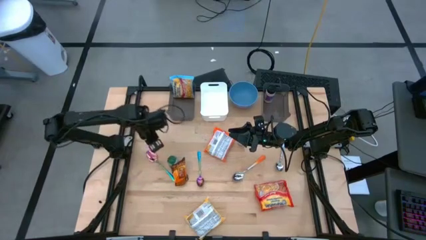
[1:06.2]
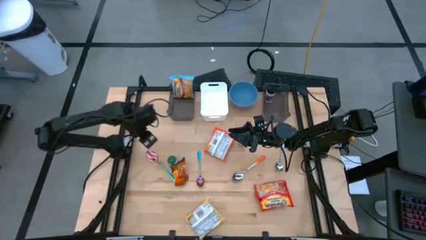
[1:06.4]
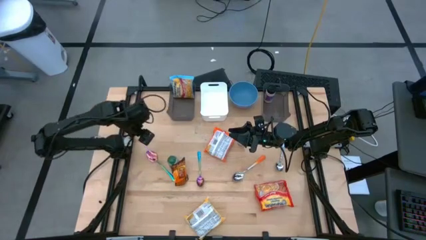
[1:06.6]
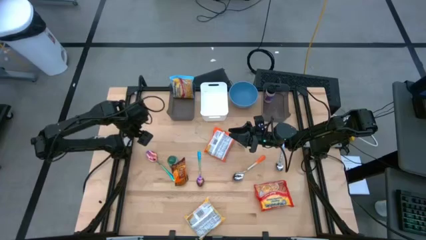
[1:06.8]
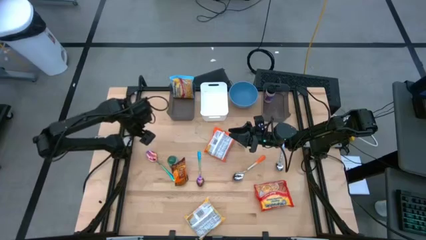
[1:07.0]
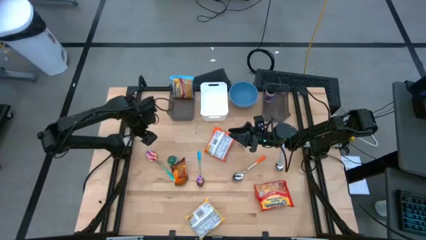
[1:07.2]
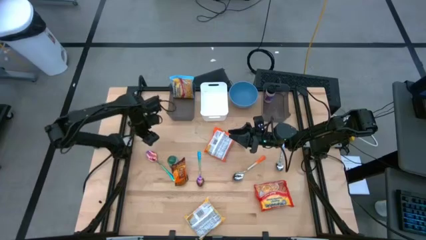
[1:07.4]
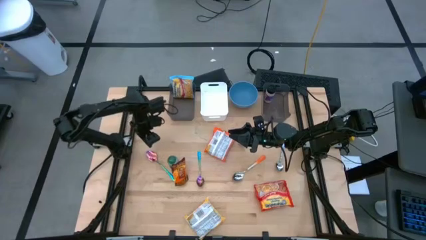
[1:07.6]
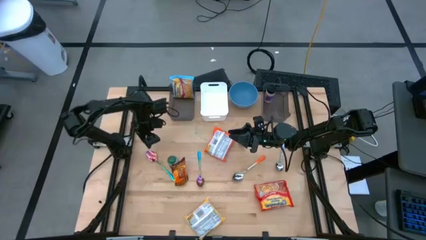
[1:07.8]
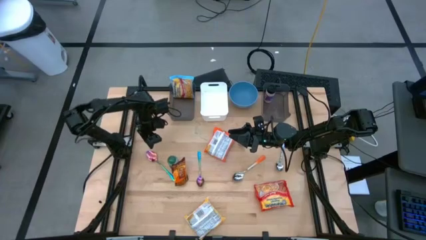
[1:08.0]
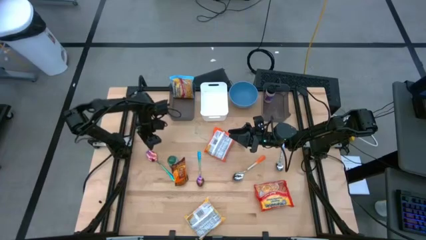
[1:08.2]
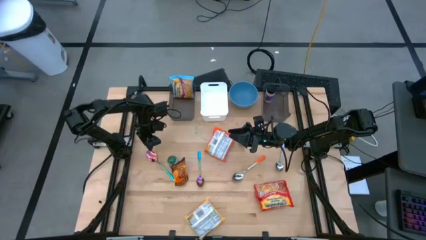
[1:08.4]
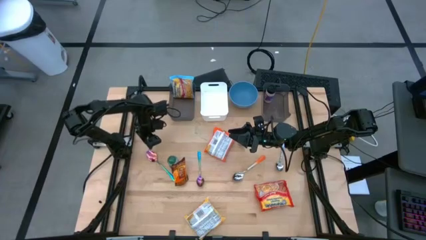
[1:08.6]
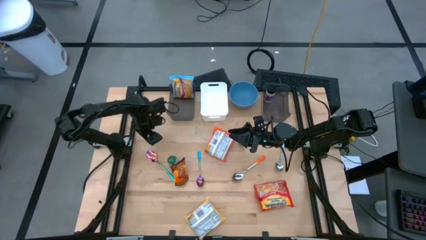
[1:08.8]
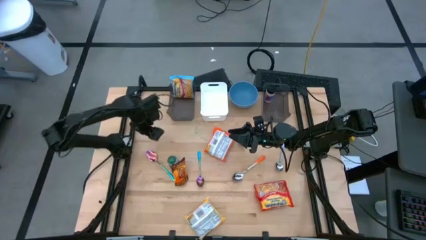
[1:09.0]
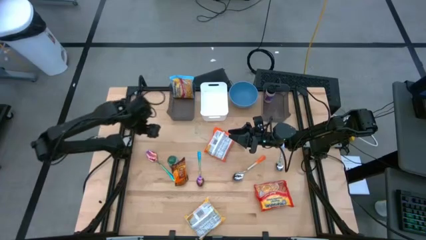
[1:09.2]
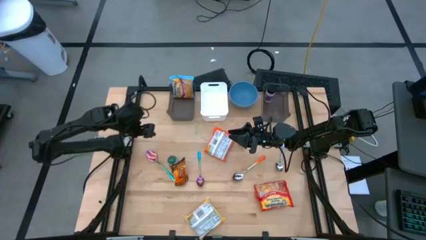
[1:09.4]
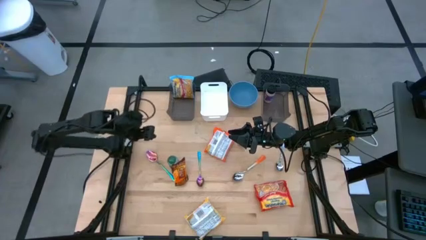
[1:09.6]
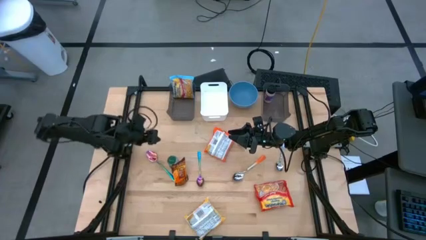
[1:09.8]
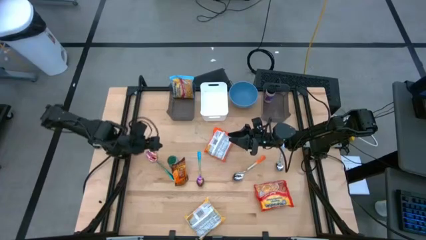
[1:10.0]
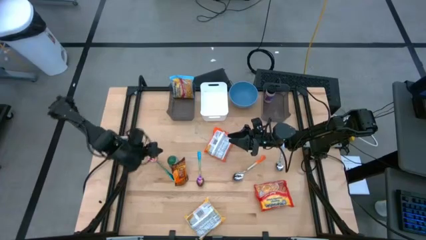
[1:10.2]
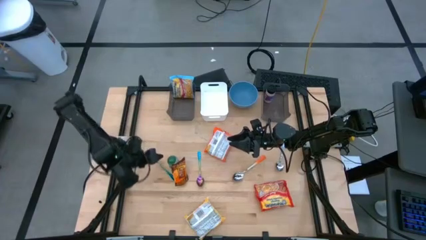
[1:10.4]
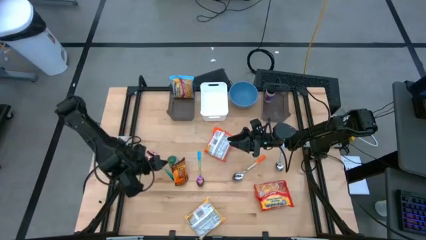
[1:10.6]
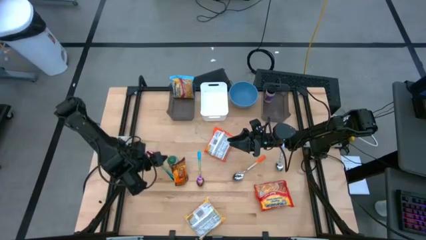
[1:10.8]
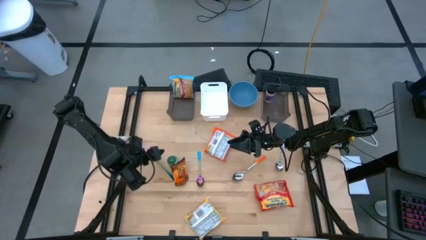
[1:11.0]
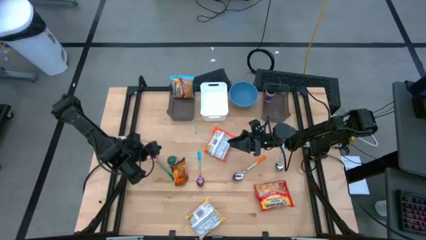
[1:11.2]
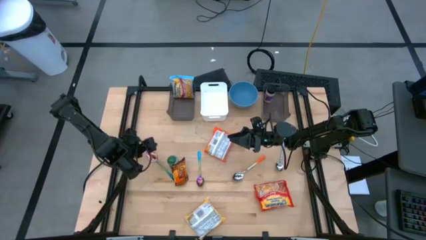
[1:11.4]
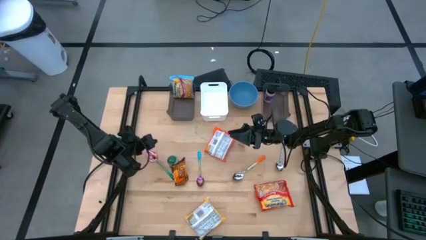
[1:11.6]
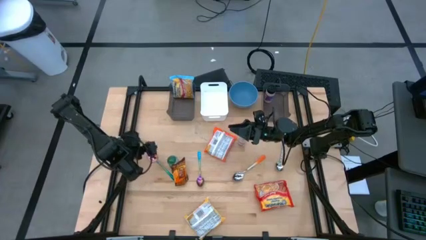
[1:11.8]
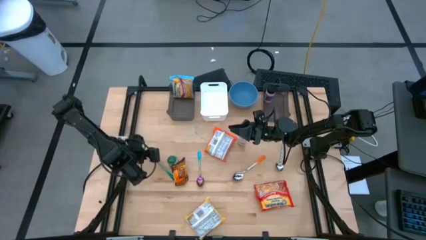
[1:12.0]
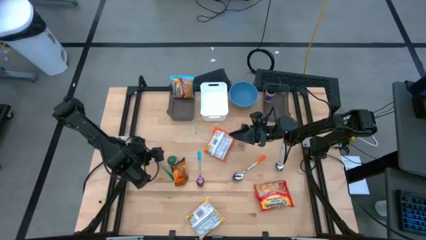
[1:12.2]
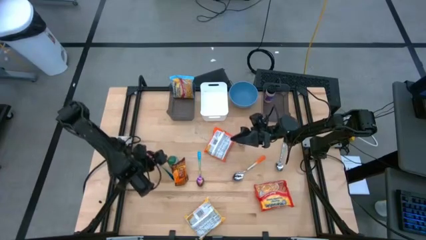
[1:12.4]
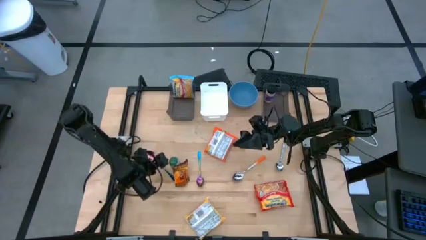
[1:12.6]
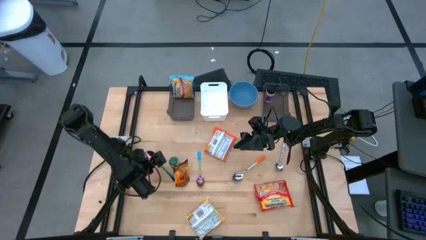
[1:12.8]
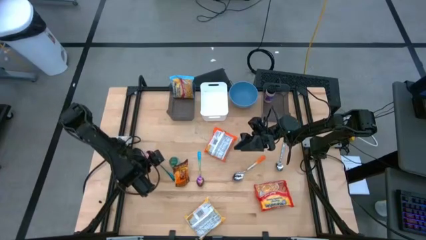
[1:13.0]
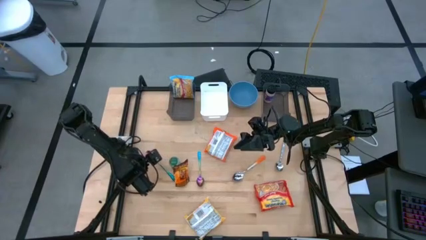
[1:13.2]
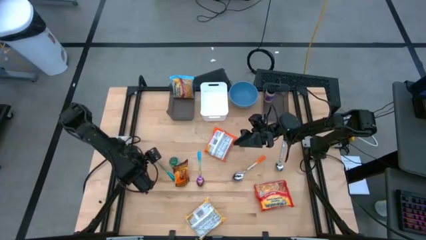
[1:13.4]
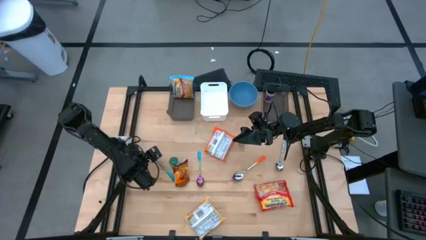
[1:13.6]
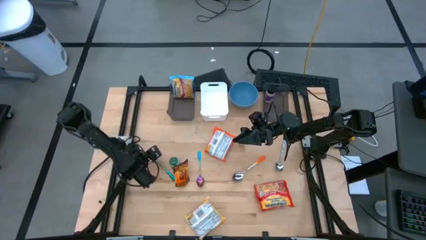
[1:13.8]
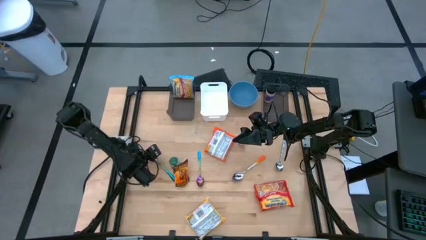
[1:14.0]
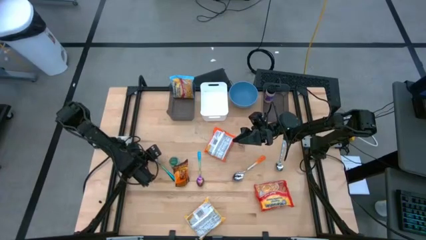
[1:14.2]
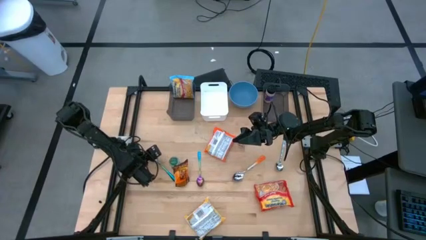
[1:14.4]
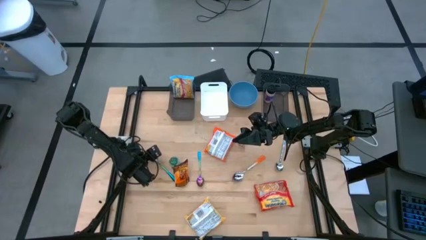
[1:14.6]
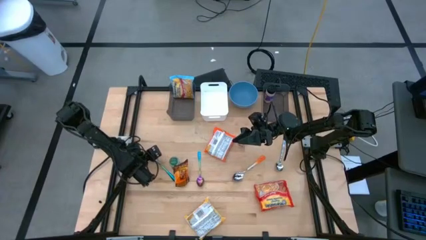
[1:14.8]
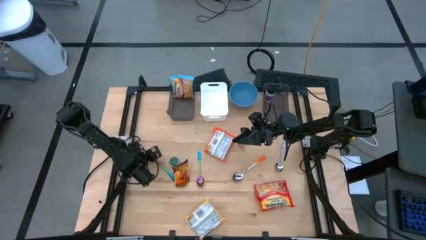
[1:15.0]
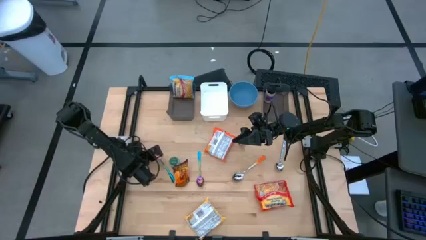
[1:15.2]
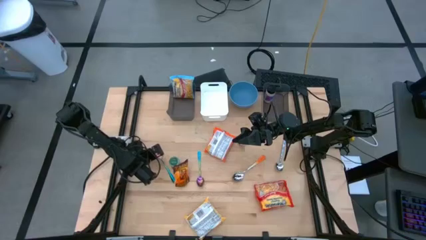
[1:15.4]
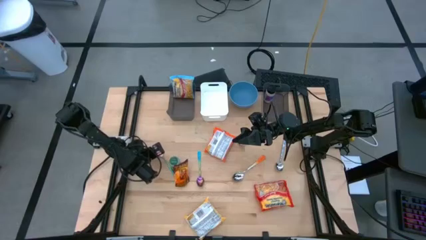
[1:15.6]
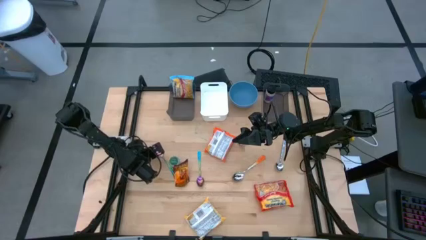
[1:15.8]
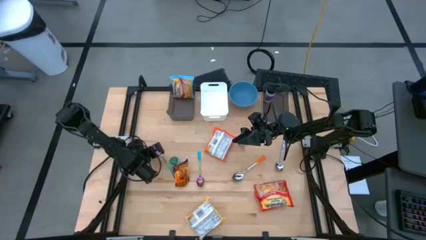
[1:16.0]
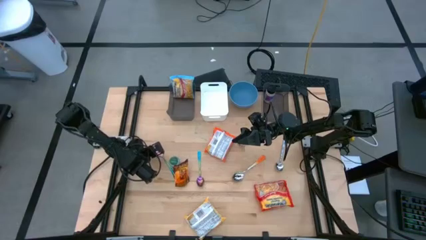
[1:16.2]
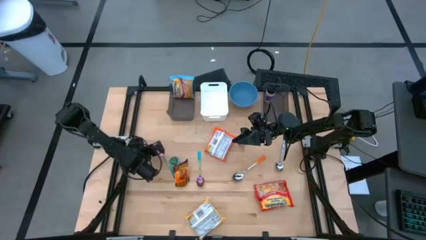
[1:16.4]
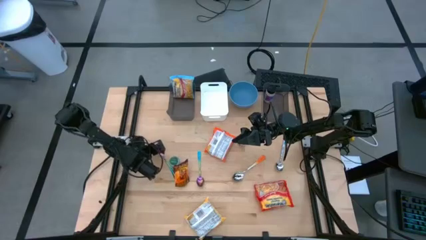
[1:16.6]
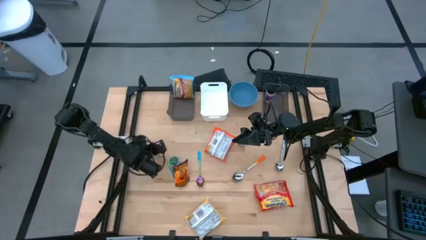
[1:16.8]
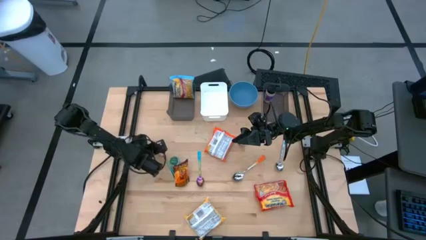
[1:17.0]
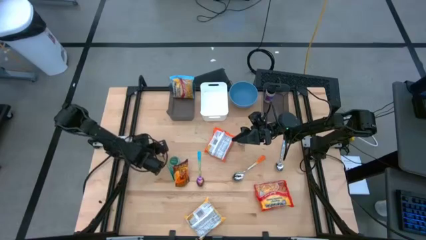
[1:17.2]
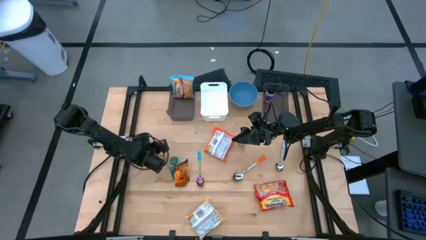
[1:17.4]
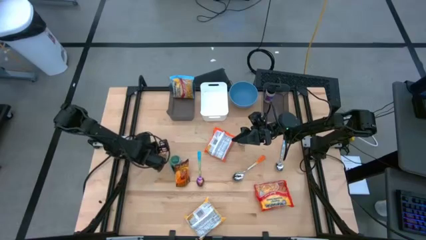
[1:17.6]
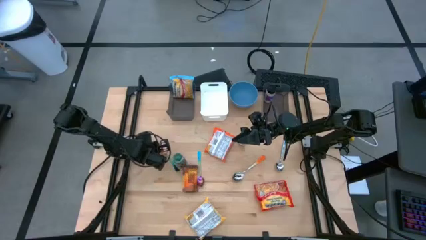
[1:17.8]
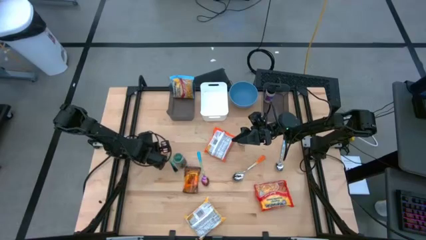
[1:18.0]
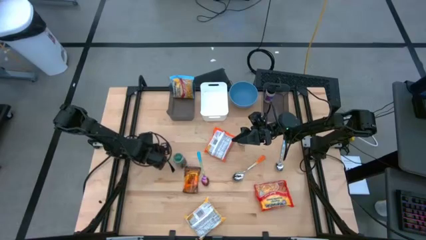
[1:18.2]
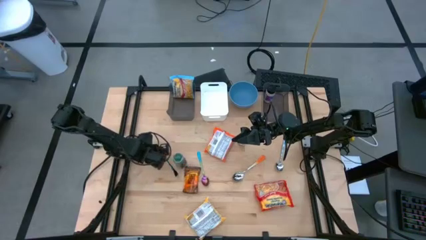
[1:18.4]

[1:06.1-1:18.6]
Task: Pick & Place Food Item
Put the left blue spoon into the white bin

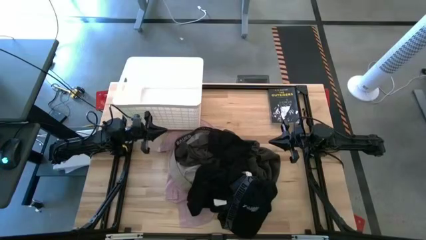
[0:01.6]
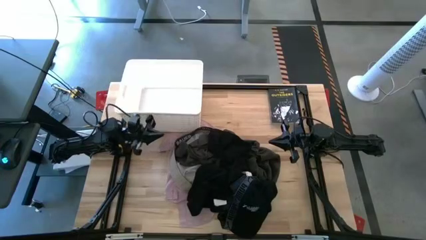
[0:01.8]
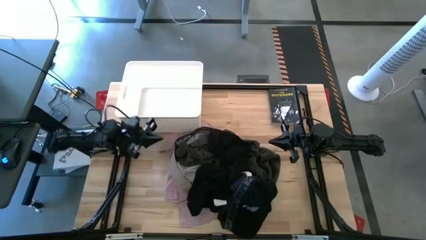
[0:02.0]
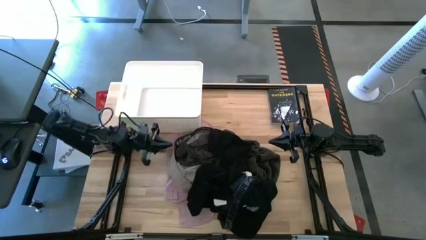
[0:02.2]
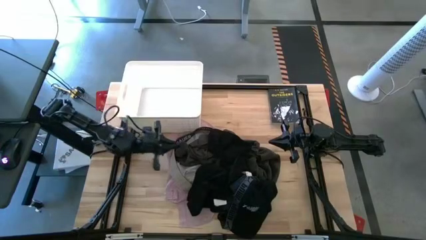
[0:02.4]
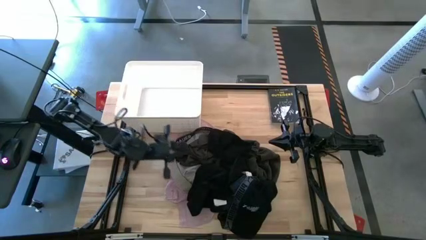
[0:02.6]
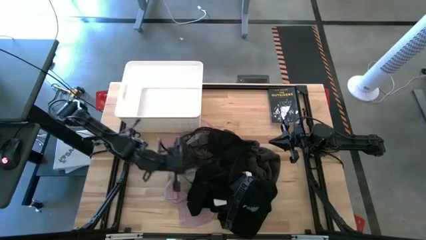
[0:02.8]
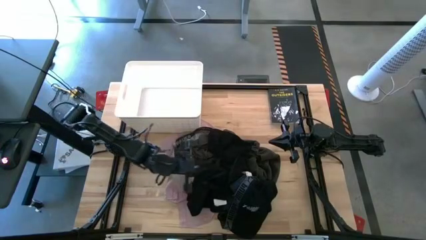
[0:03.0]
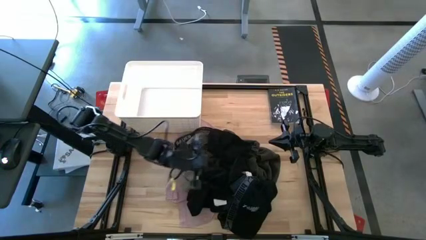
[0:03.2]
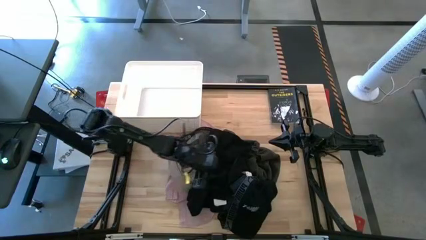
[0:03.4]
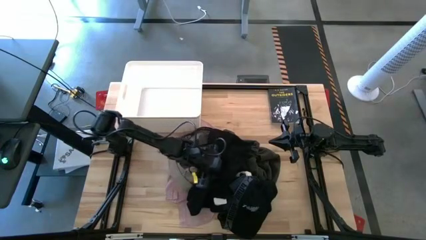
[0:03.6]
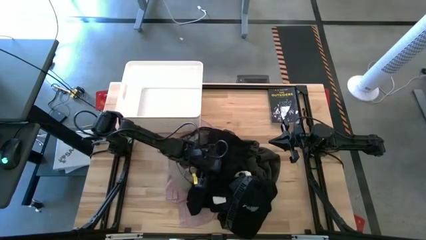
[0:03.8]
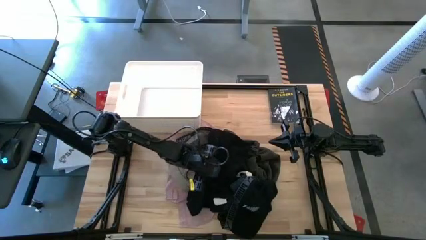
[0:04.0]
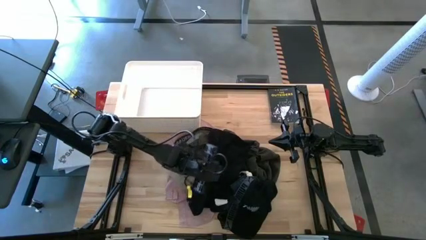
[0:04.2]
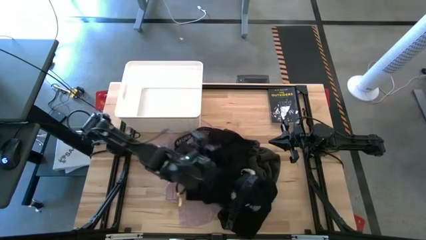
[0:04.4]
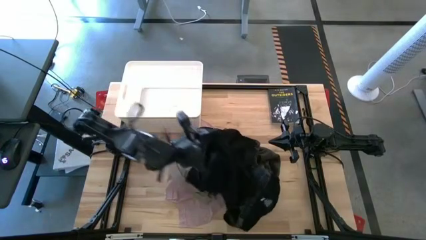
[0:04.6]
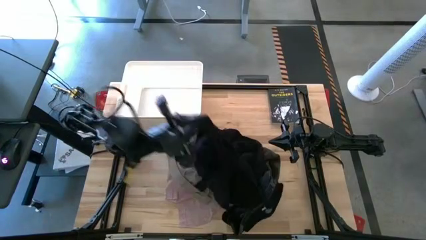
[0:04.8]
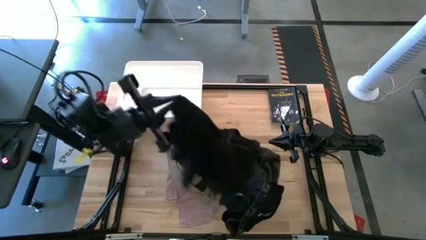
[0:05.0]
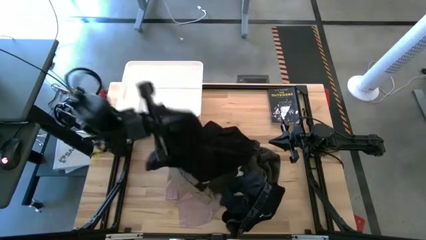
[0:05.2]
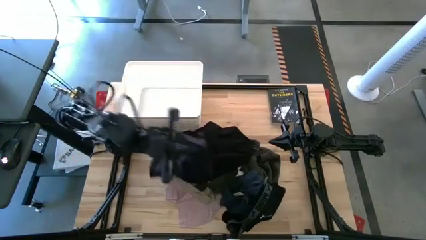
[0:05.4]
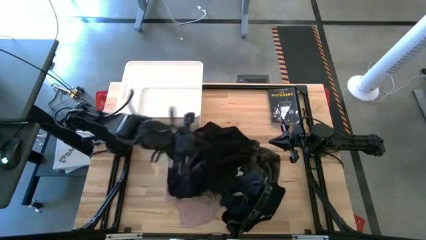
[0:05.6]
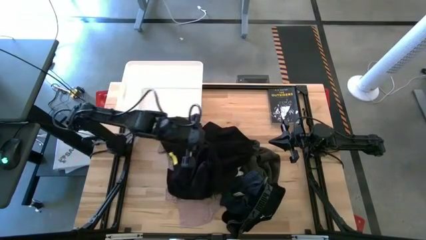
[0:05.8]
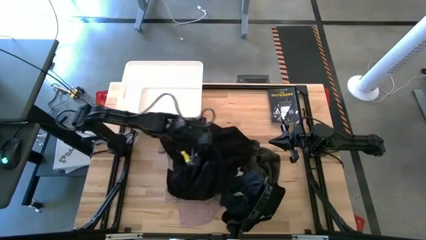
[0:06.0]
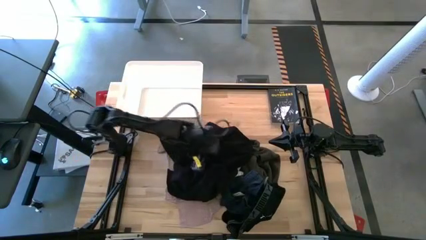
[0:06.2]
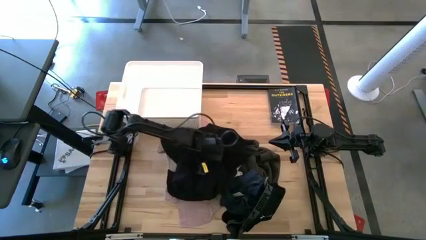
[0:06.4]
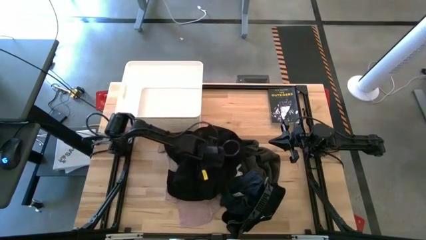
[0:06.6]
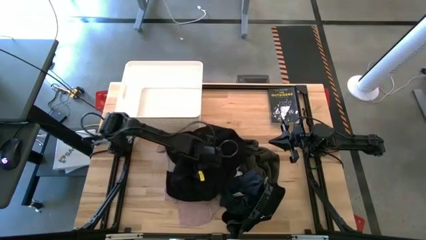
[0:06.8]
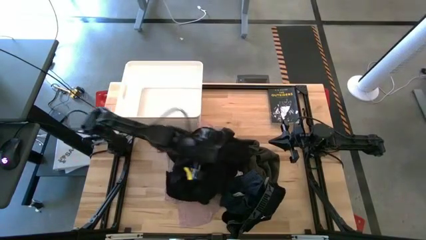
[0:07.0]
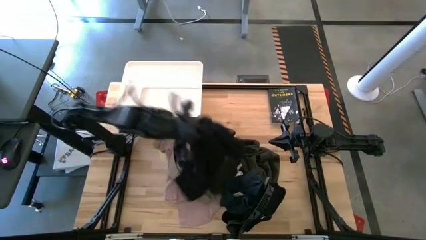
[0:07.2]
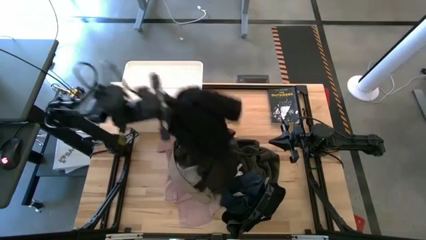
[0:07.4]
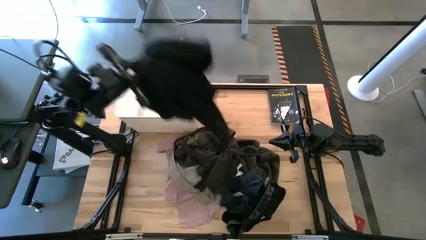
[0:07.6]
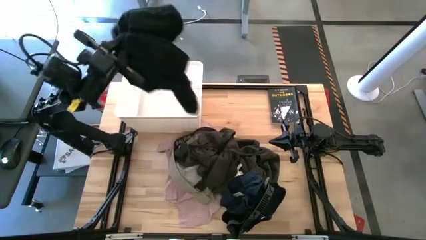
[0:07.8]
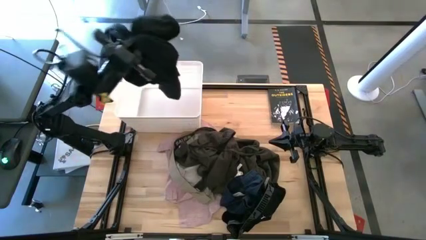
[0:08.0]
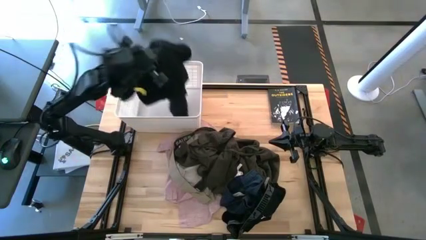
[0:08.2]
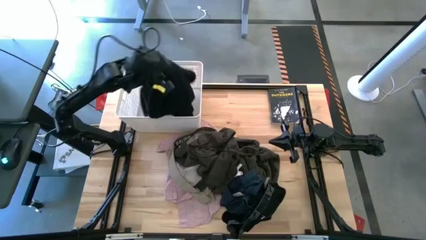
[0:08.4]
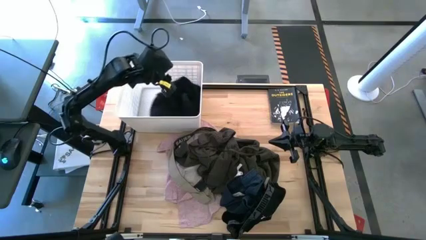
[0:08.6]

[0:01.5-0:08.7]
Task: Sort clothes
Put the black shirt into the white laundry bin
